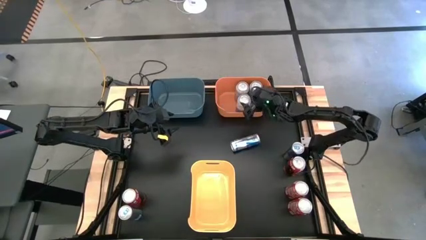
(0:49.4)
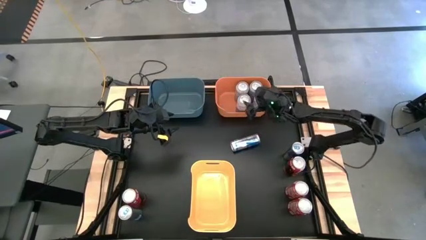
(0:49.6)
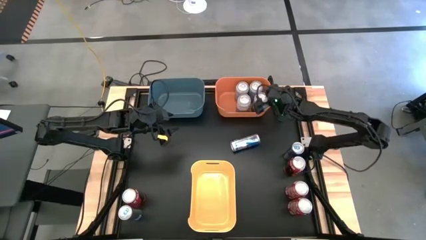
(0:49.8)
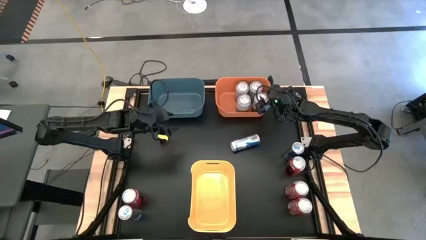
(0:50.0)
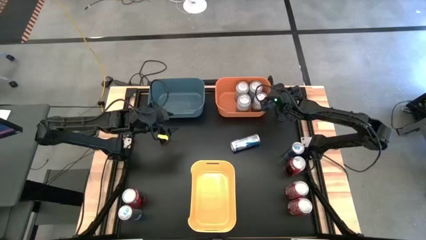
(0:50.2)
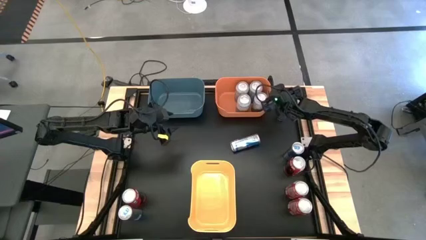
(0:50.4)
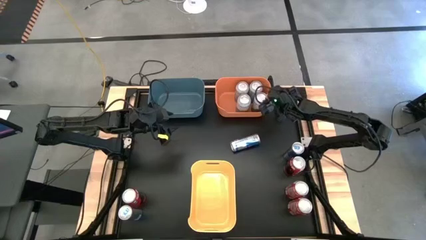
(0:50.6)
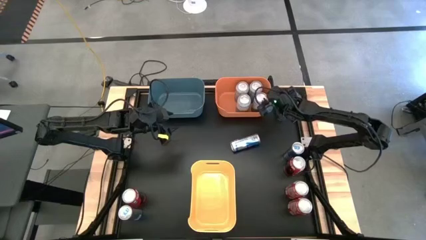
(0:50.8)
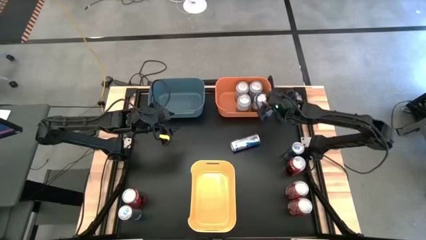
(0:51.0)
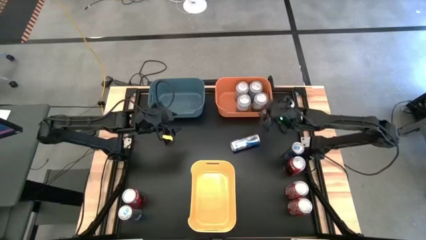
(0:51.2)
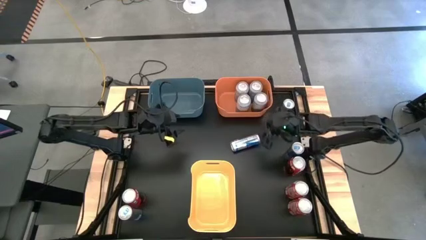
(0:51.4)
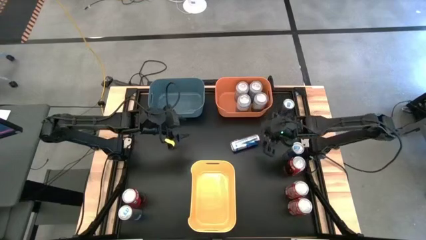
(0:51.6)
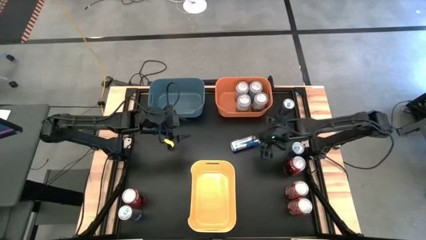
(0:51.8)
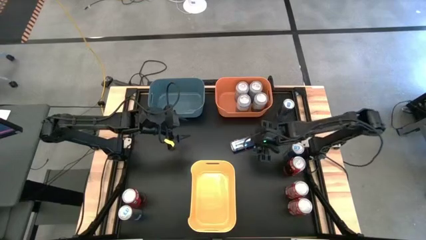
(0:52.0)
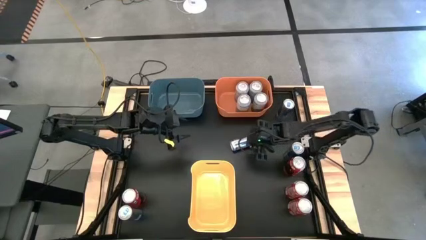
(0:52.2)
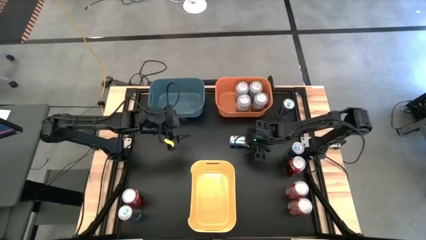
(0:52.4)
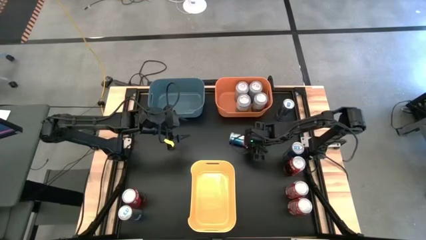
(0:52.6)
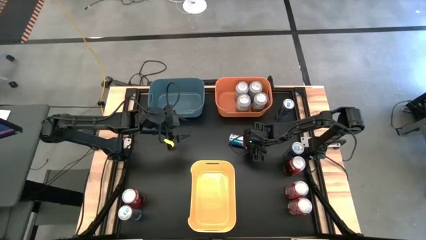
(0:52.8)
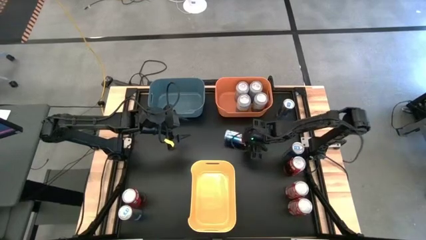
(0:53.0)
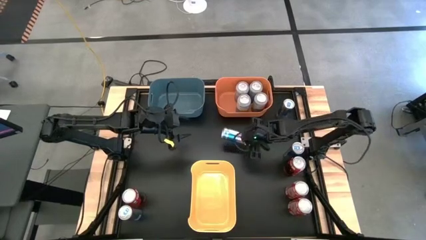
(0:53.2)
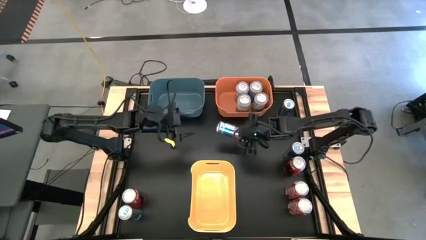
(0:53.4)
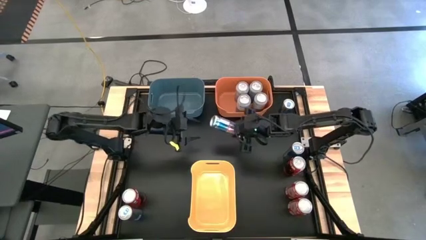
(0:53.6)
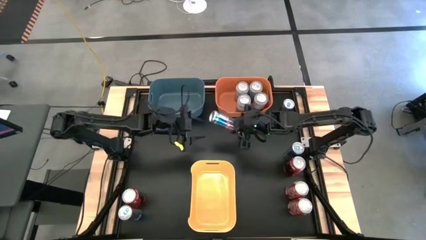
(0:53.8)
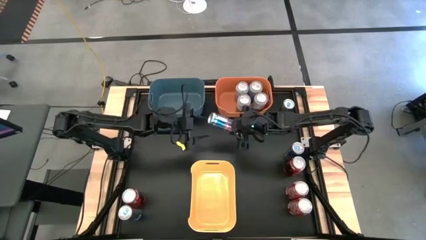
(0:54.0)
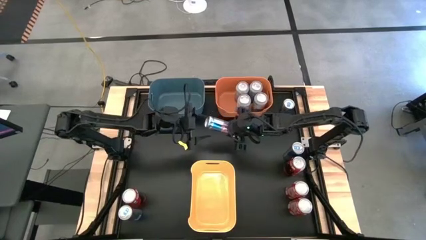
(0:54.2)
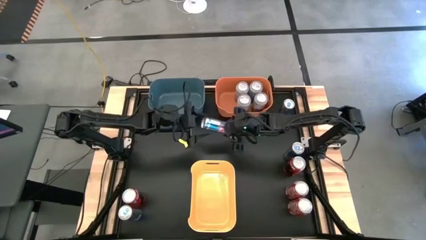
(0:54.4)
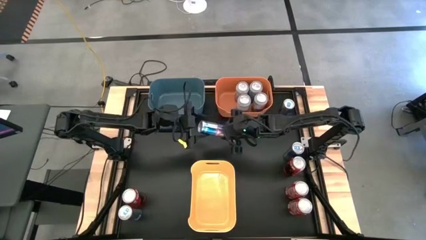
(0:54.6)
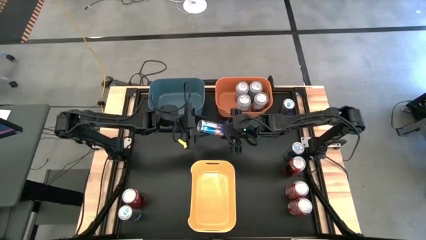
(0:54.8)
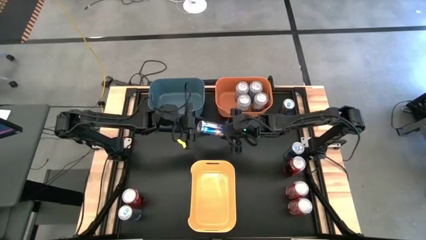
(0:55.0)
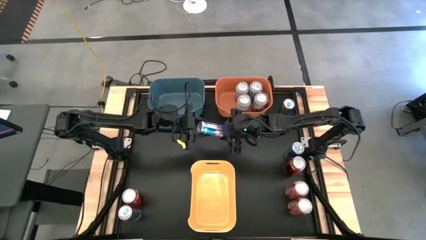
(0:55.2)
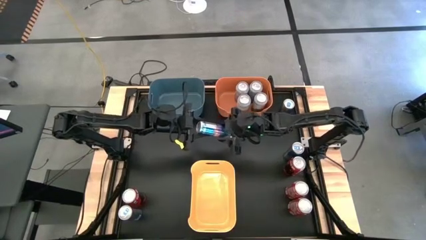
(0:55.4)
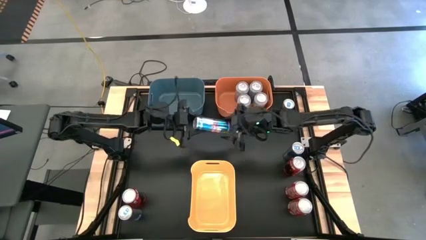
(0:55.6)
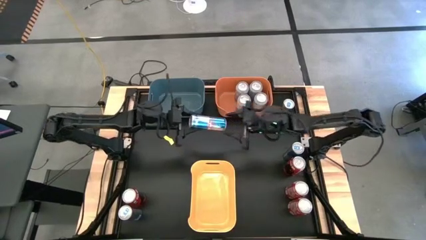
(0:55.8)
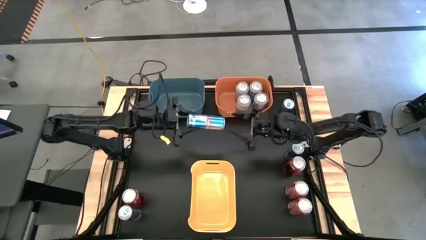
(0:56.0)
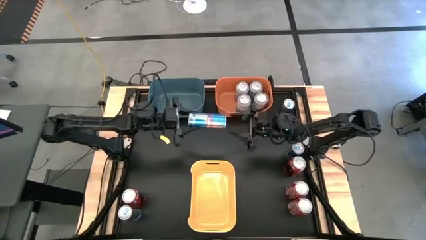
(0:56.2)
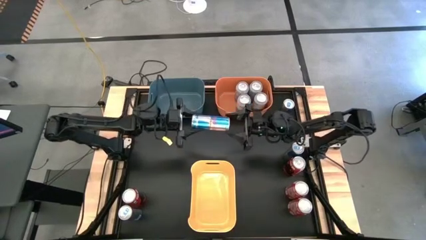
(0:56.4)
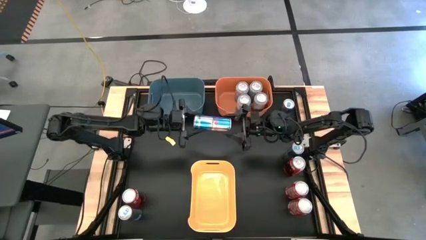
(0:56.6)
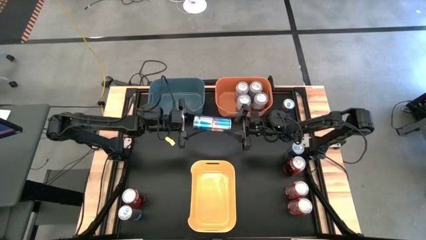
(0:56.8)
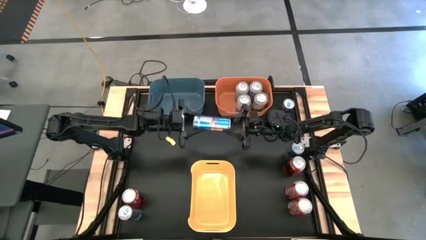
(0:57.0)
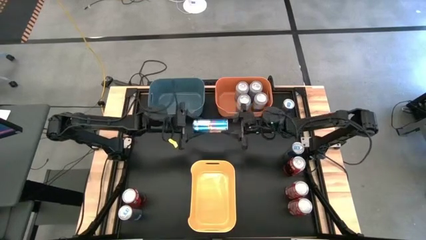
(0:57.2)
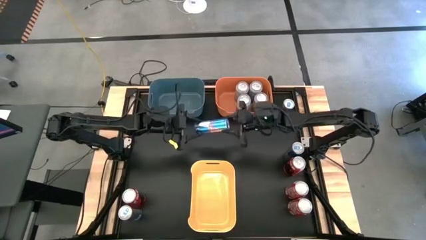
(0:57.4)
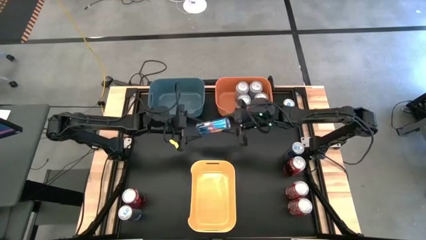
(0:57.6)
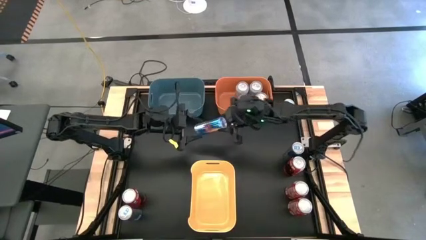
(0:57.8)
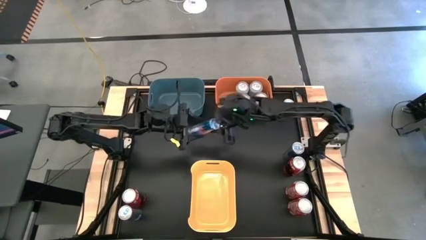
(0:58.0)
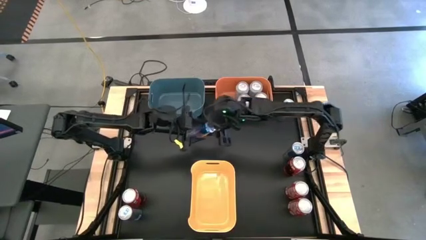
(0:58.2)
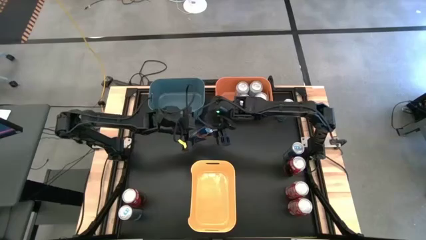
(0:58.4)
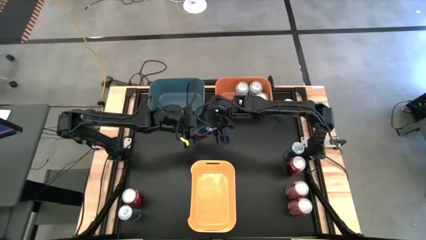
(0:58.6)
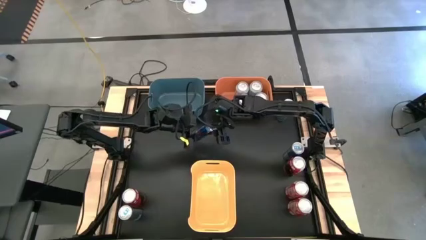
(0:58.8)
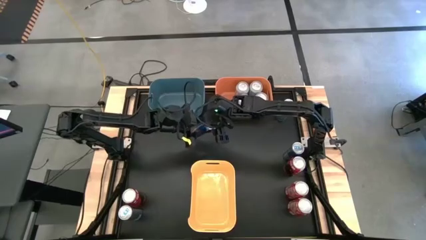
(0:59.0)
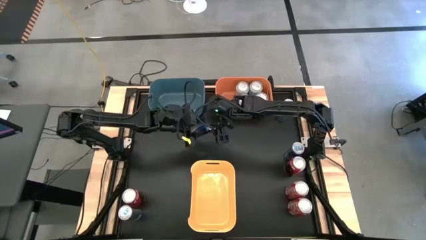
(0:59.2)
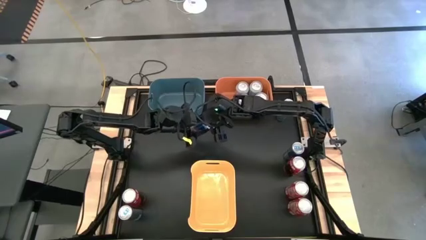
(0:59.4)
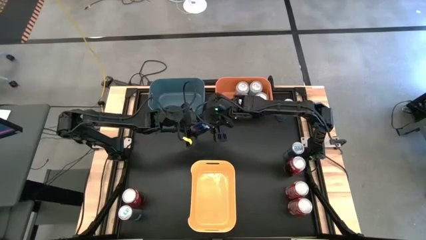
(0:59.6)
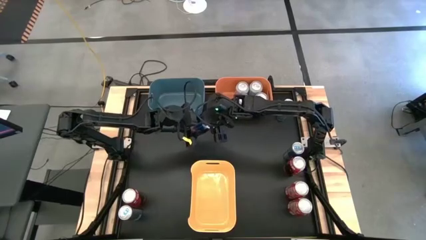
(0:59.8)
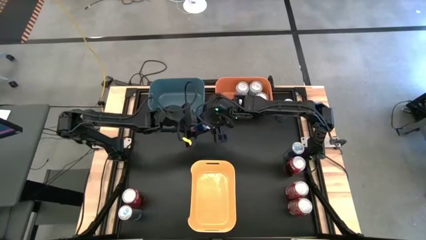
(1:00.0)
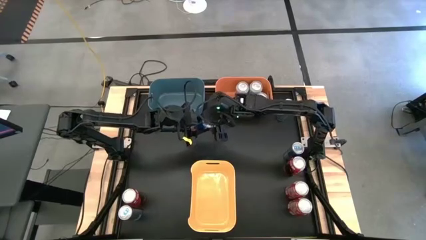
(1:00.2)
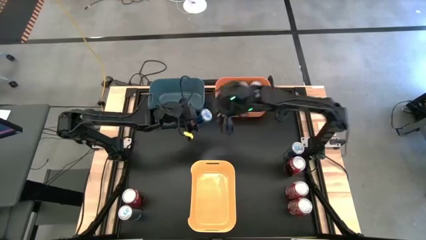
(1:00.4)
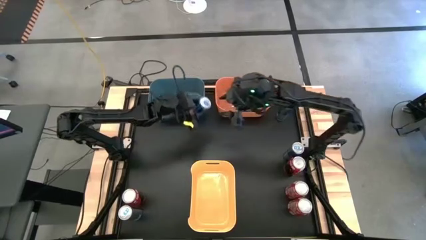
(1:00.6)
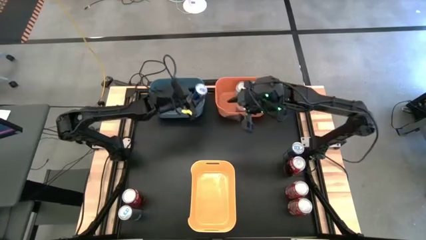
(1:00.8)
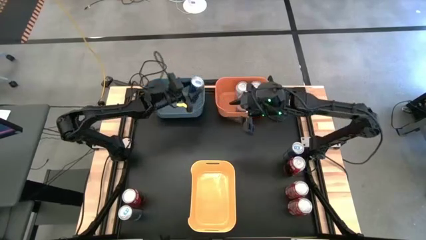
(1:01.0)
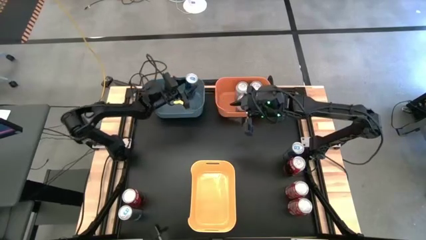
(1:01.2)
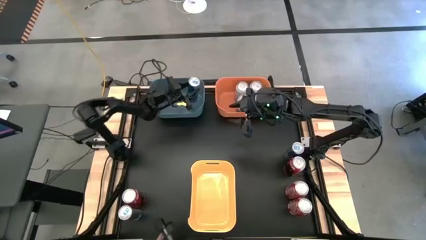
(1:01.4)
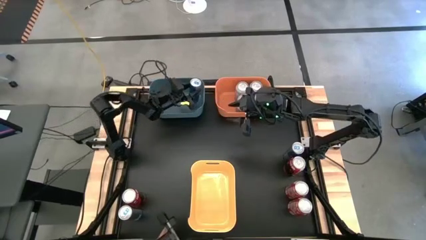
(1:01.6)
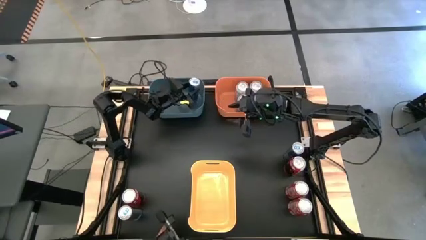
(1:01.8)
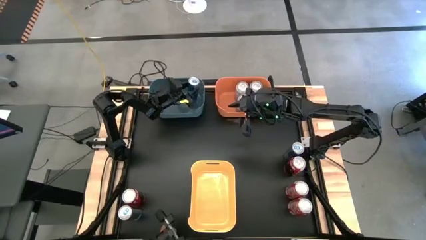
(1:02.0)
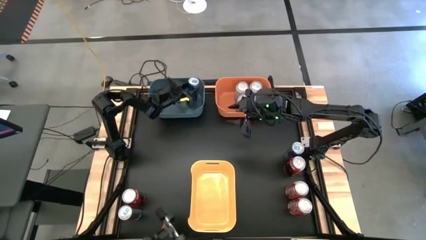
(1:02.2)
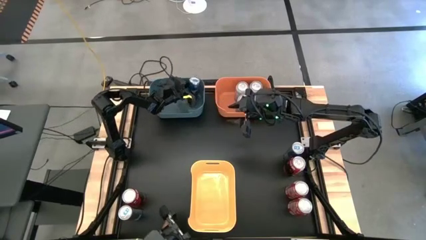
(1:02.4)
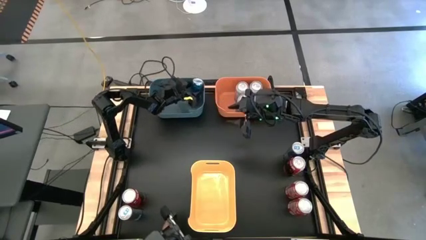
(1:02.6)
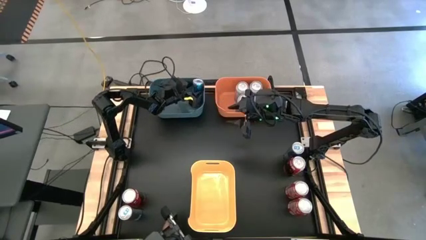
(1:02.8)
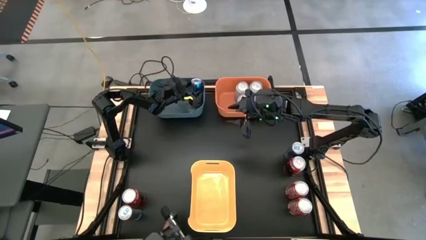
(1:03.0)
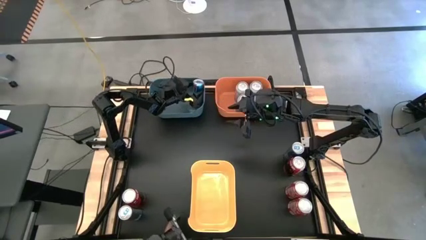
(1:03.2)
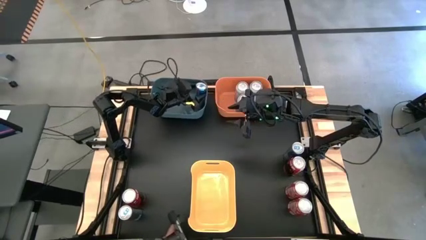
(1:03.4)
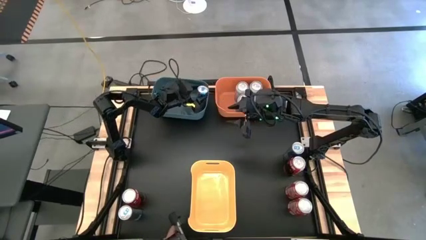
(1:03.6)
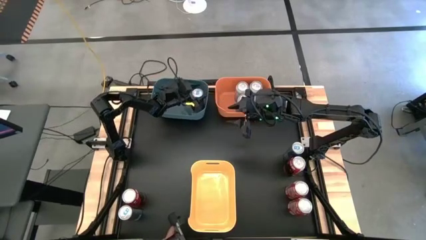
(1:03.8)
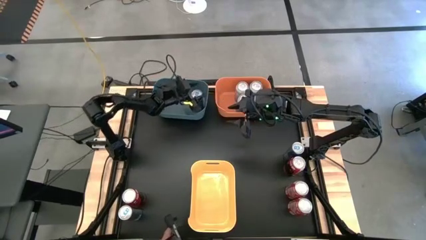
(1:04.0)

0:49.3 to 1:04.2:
Task: Sort soda cans
Put the blue soda can into the blue bin
